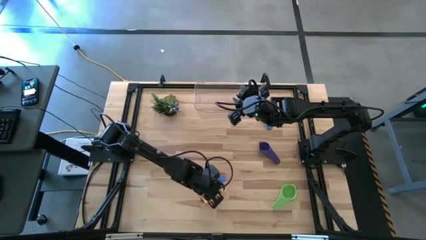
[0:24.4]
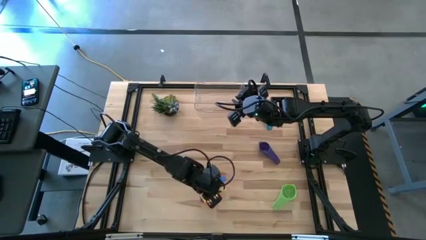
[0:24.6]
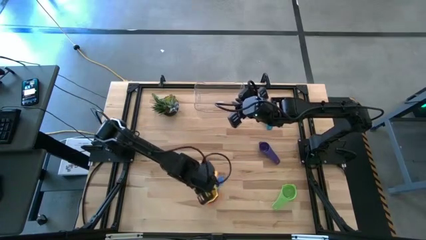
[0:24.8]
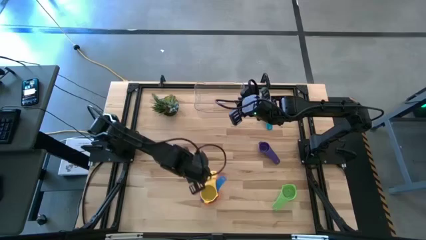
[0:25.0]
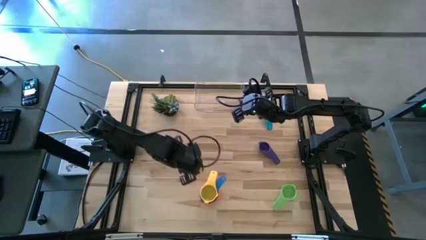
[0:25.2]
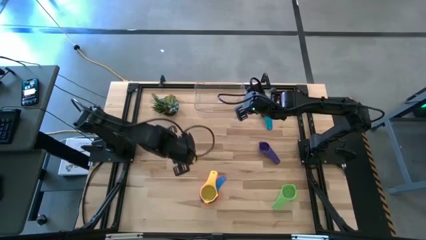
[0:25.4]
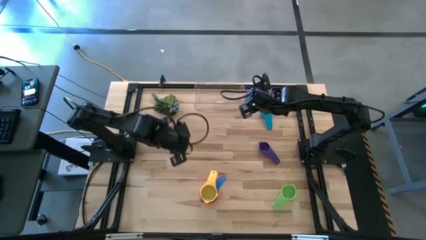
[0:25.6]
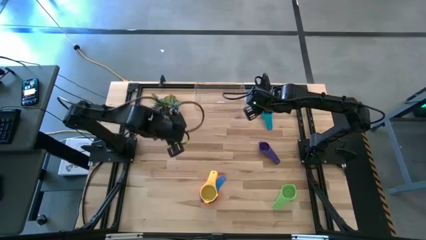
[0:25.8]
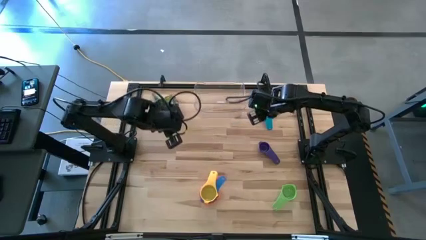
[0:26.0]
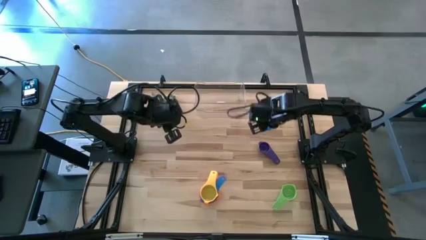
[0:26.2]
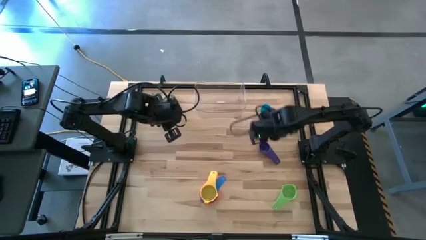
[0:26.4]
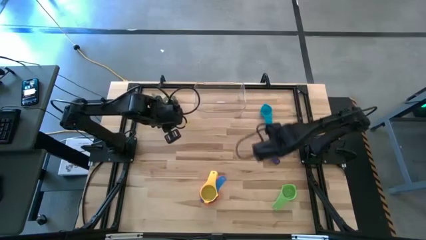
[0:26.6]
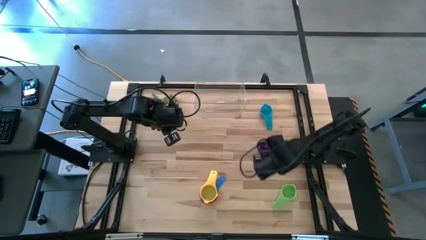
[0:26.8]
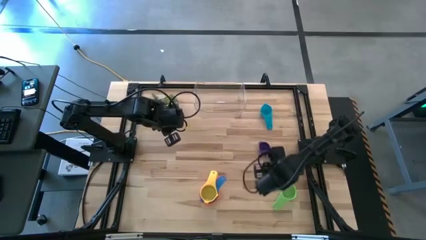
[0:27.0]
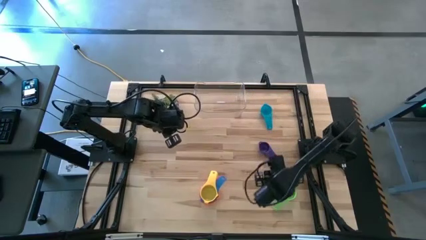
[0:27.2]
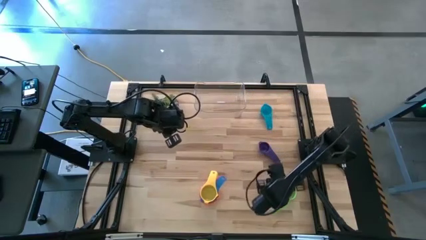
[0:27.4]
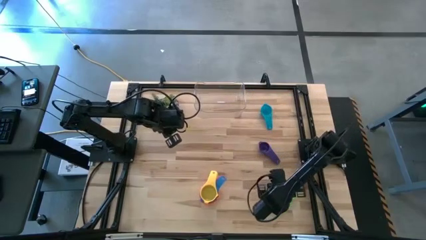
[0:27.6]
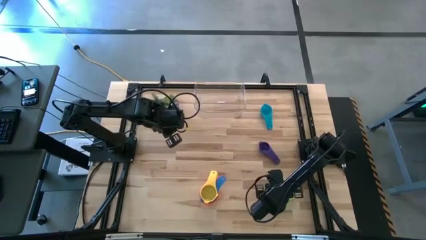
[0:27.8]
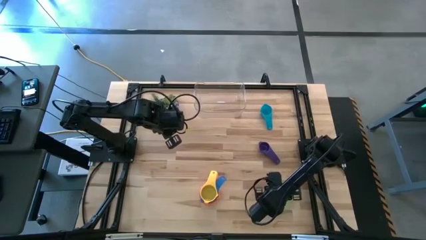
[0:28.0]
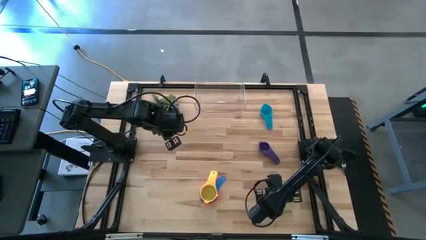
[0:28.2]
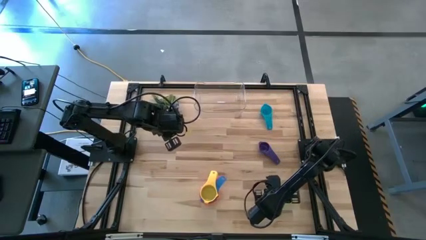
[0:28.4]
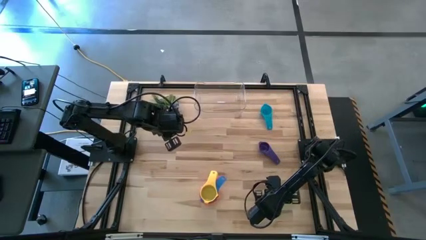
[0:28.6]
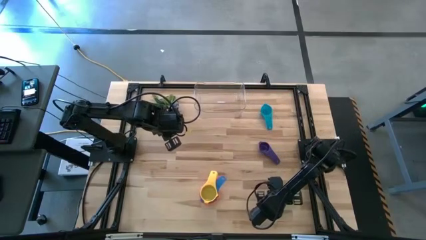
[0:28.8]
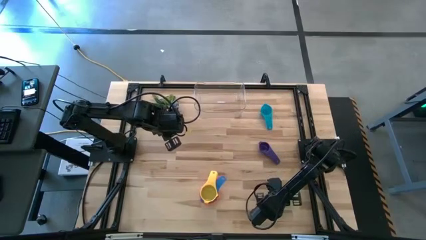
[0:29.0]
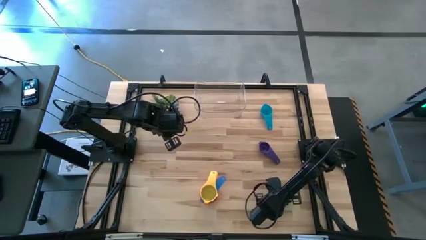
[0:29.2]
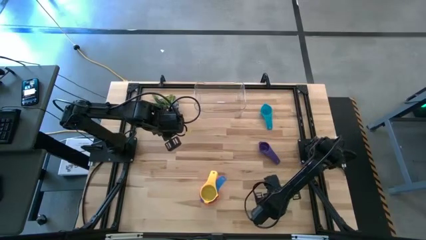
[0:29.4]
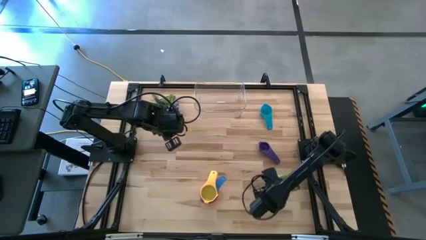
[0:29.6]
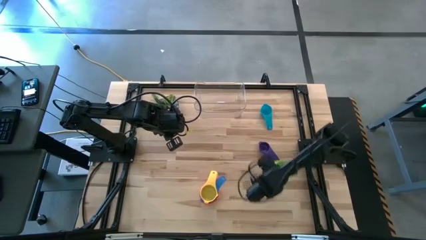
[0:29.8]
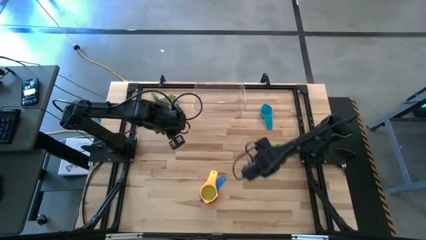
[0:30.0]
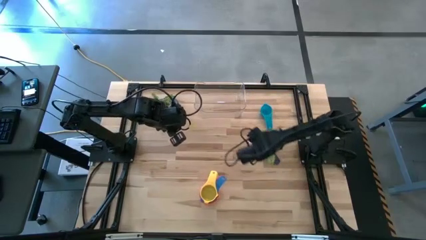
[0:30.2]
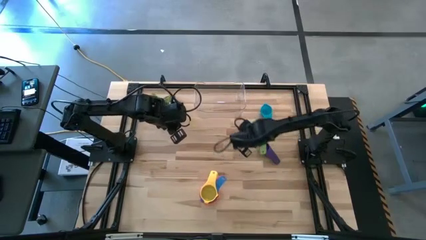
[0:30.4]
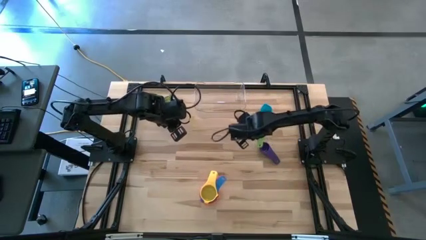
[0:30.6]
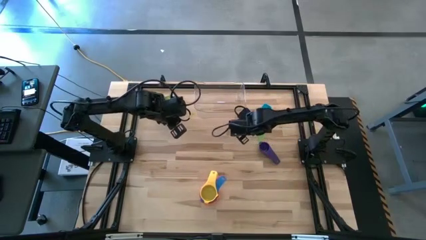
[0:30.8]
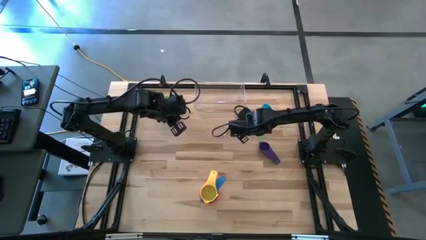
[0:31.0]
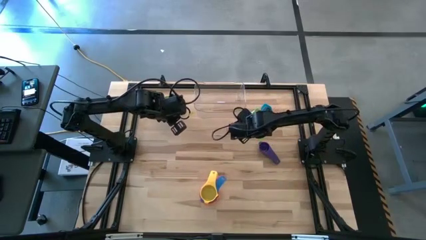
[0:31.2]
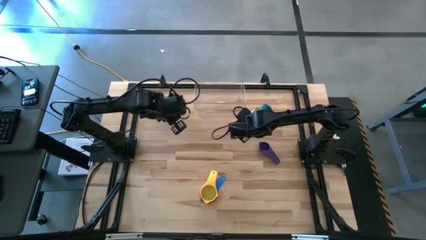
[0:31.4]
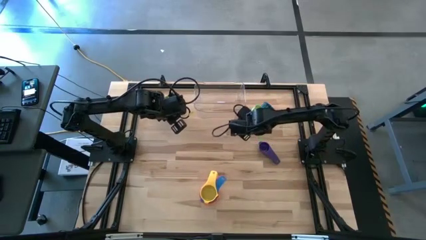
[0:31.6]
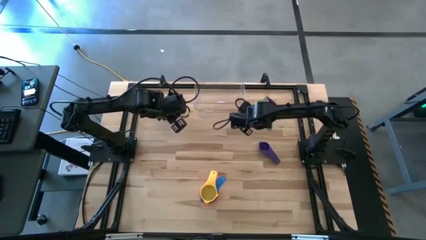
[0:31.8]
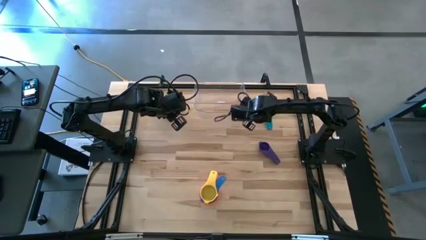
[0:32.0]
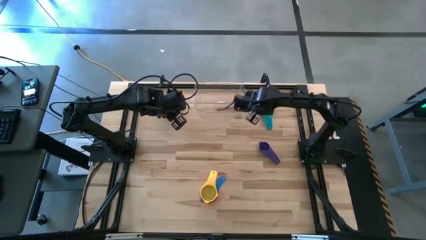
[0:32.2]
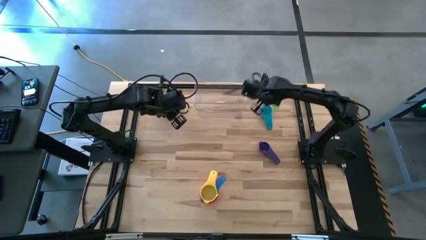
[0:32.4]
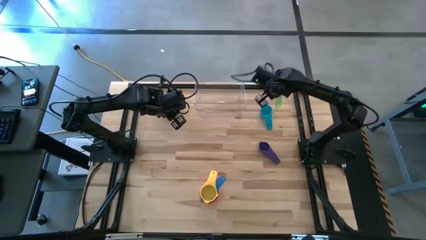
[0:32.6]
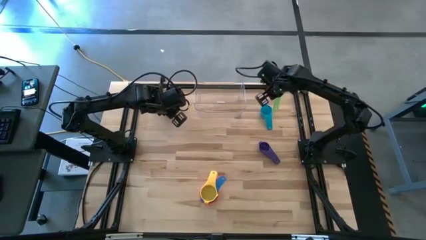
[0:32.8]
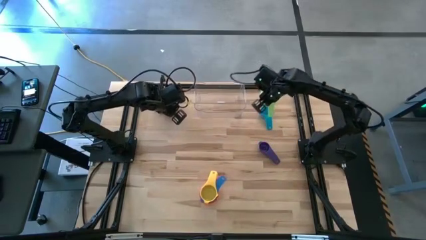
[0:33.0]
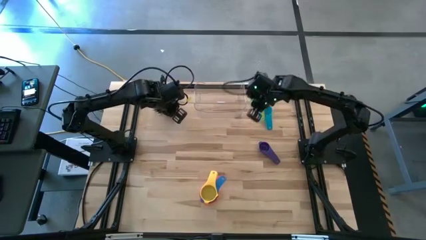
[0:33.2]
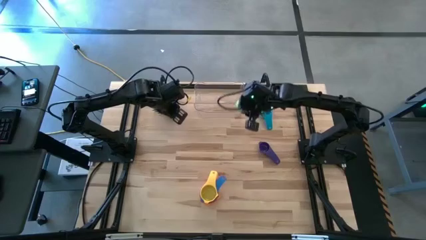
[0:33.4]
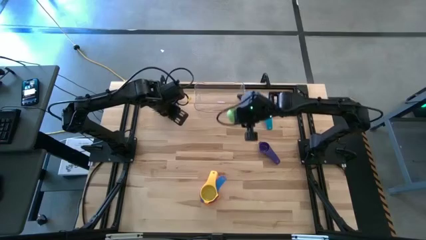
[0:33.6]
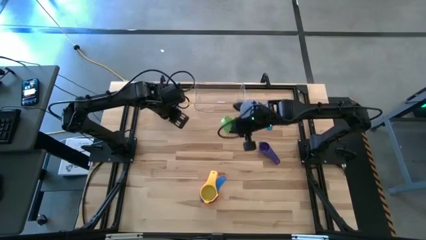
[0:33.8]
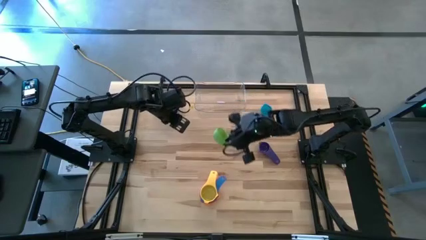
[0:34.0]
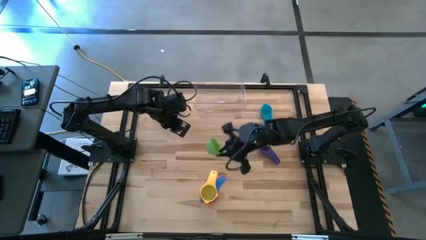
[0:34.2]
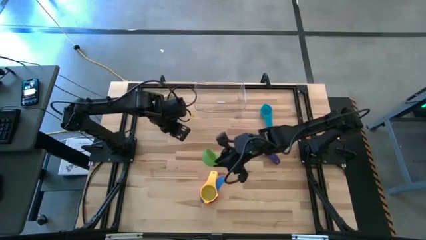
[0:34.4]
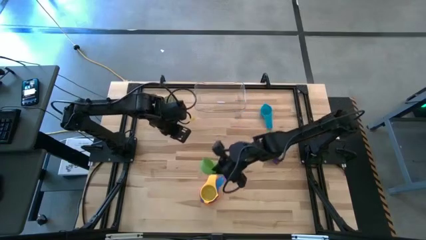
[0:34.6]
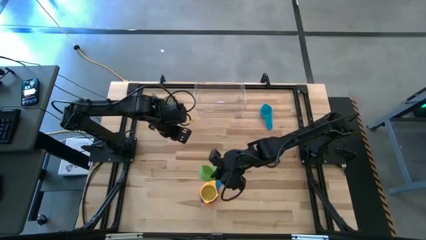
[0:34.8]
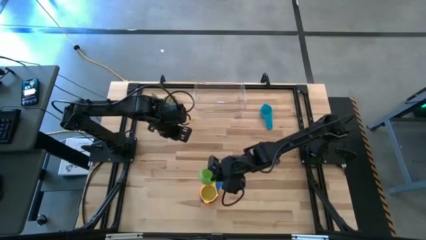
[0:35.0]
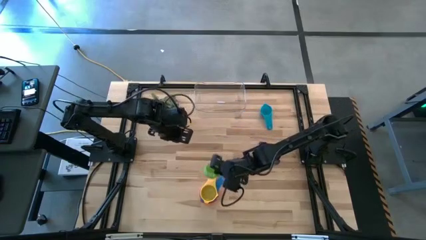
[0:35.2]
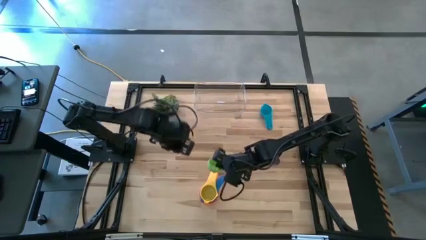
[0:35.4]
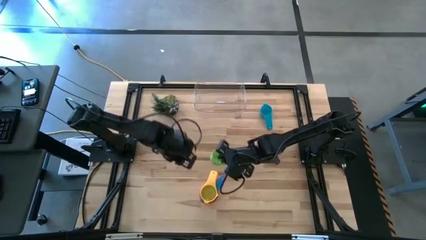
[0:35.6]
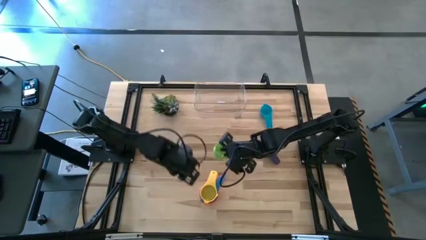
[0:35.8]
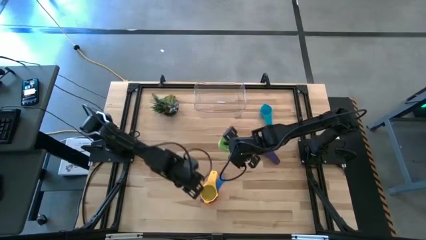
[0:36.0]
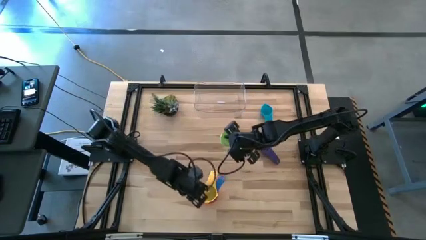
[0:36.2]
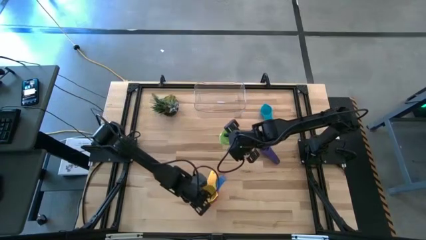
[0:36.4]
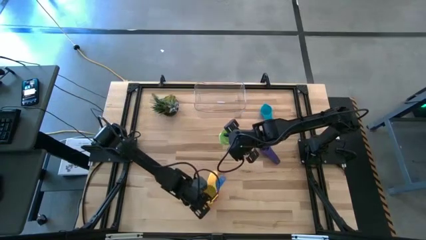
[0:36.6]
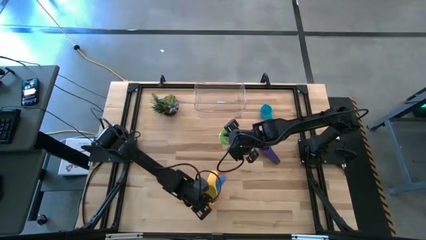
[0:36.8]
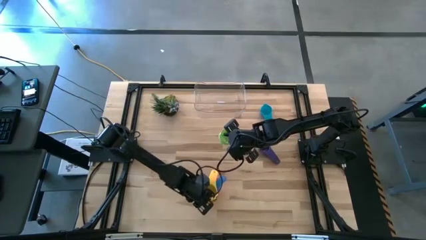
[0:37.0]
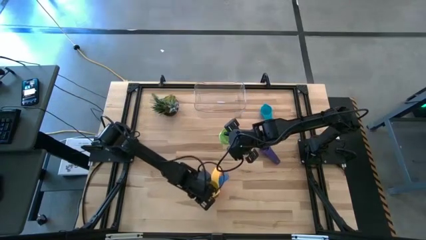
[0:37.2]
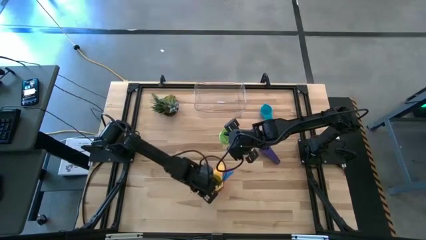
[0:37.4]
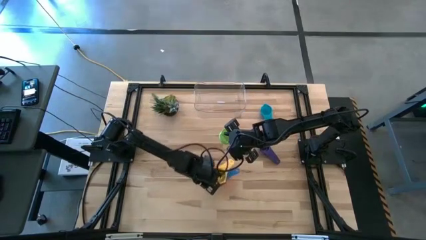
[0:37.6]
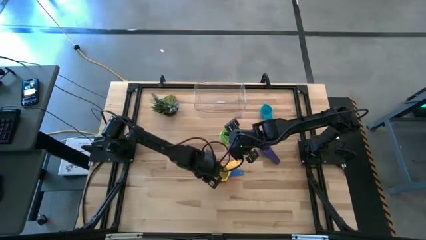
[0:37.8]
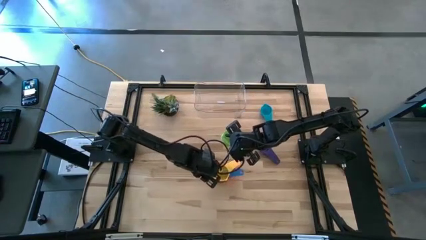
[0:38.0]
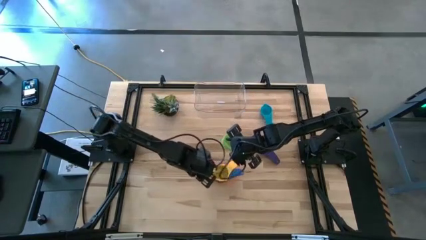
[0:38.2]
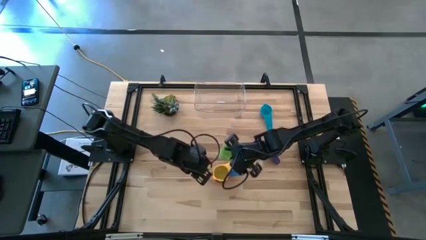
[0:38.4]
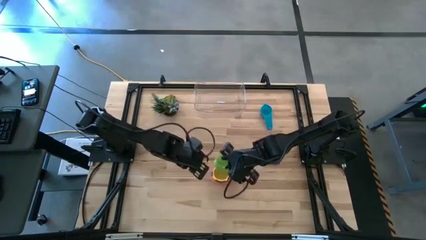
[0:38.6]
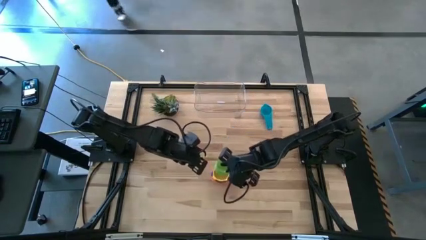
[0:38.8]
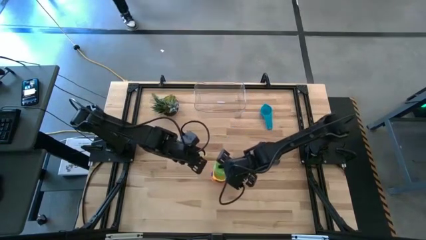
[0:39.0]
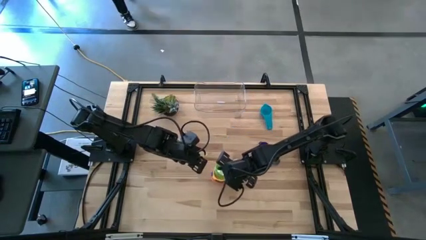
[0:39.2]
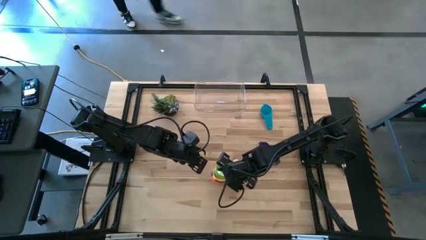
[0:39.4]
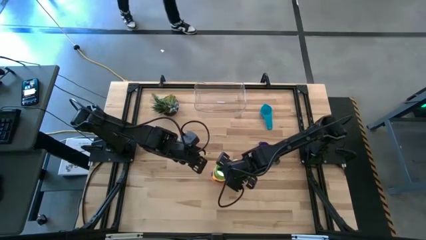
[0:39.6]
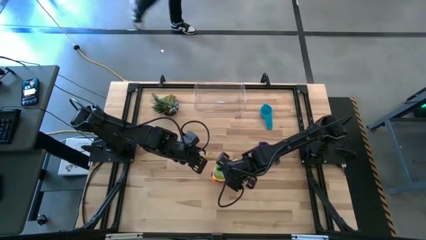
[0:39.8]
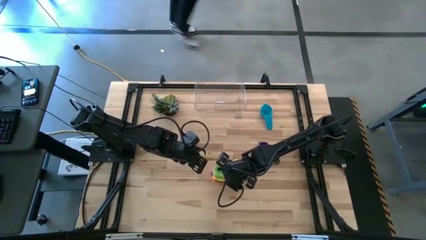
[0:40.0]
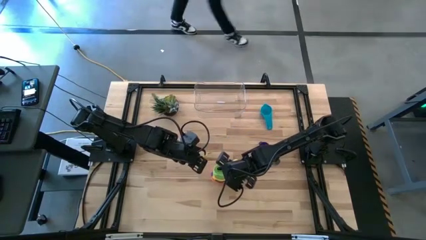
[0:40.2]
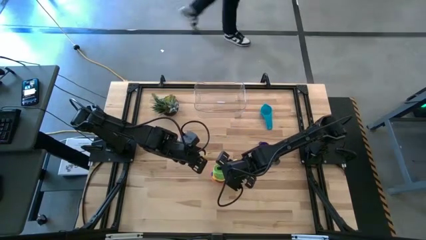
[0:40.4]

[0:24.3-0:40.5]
Task: Nest measuring cups in basket
Stack the green measuring cup on the yellow measuring cup
